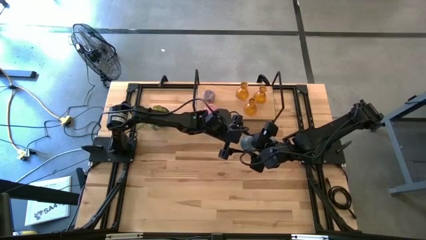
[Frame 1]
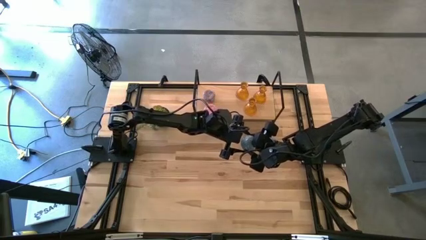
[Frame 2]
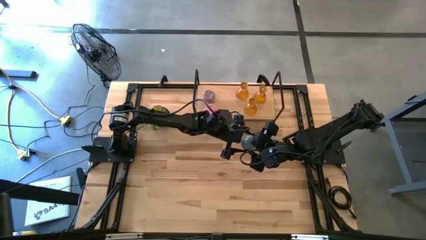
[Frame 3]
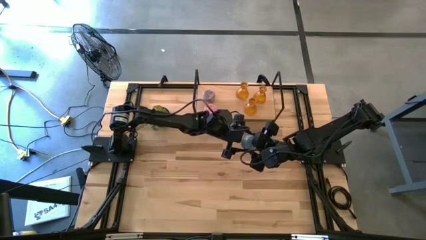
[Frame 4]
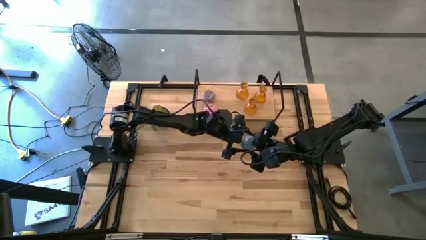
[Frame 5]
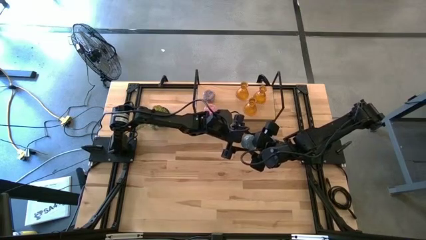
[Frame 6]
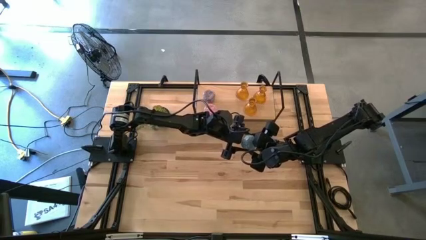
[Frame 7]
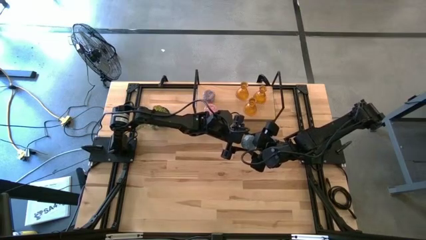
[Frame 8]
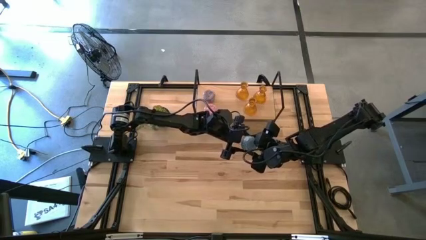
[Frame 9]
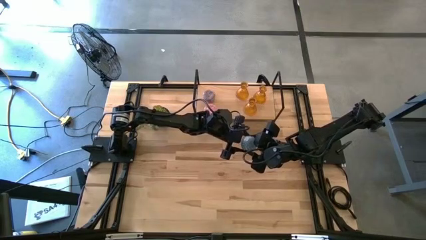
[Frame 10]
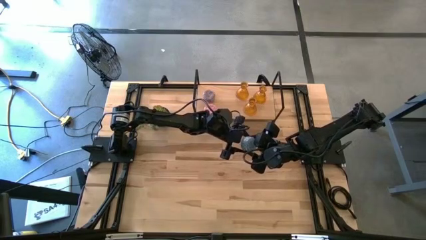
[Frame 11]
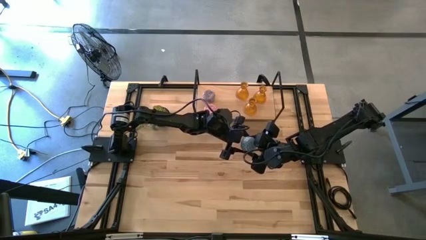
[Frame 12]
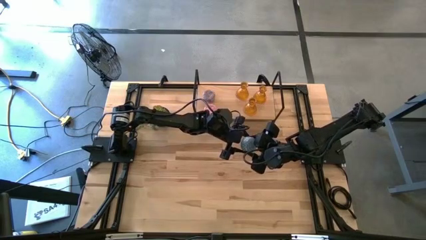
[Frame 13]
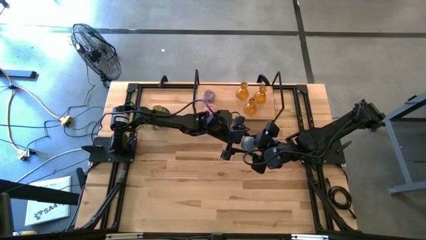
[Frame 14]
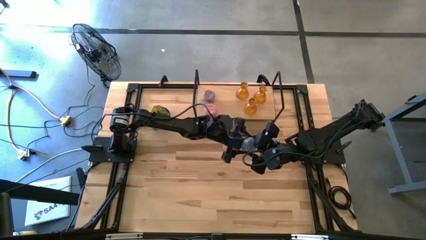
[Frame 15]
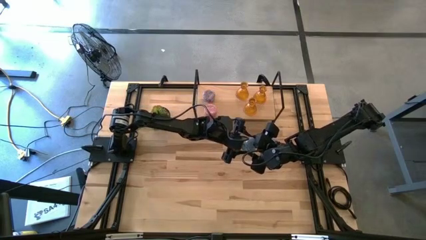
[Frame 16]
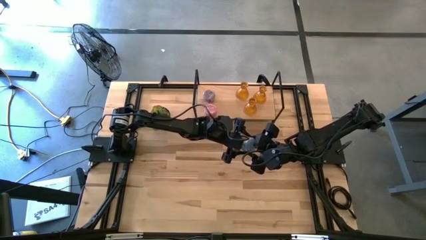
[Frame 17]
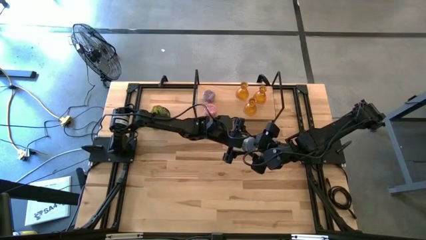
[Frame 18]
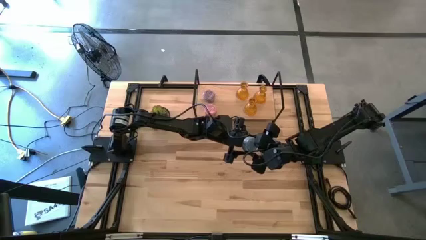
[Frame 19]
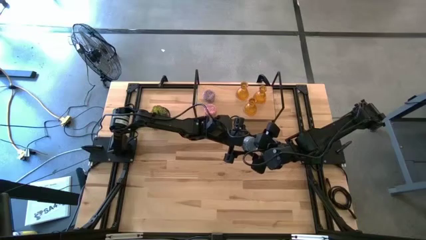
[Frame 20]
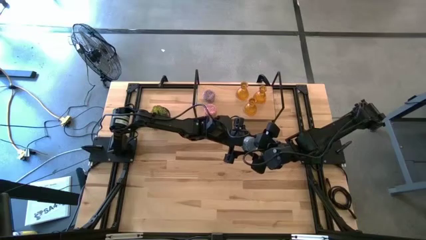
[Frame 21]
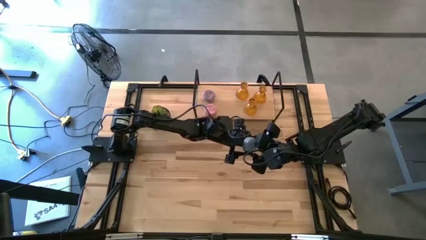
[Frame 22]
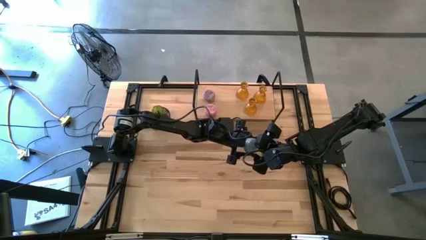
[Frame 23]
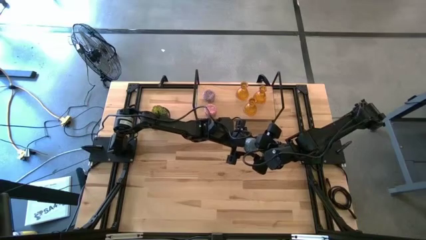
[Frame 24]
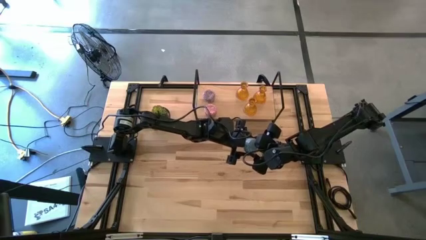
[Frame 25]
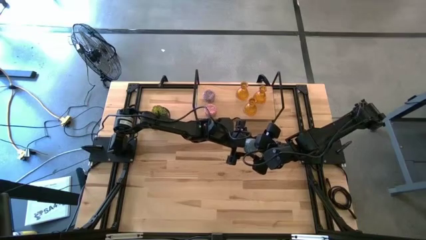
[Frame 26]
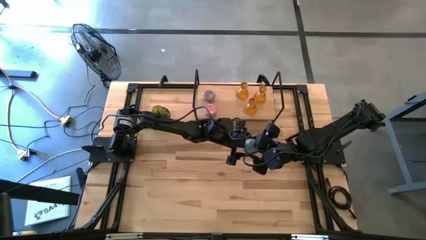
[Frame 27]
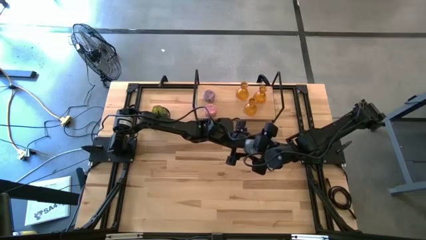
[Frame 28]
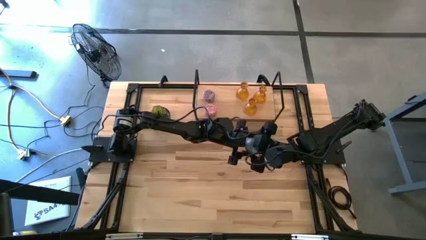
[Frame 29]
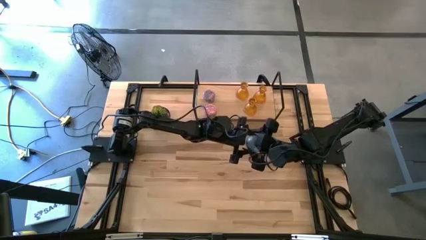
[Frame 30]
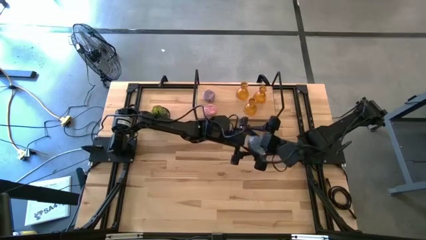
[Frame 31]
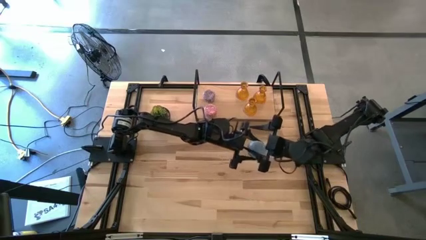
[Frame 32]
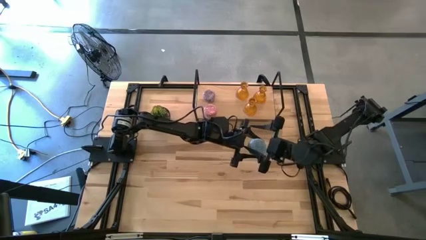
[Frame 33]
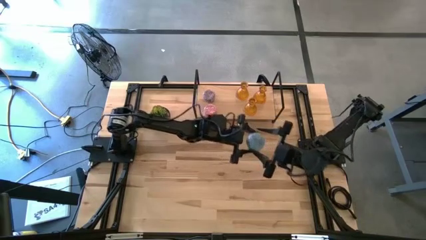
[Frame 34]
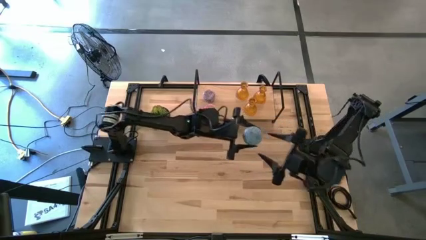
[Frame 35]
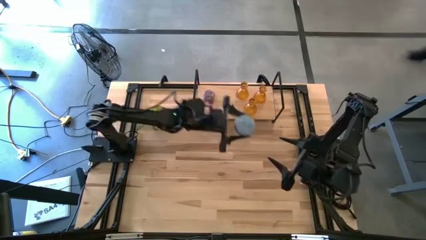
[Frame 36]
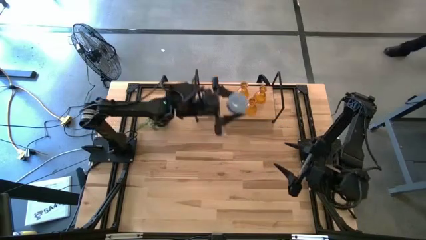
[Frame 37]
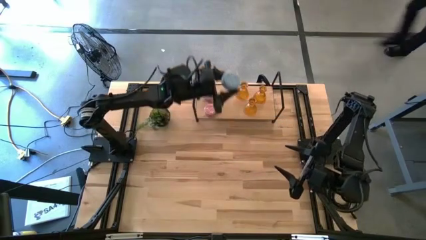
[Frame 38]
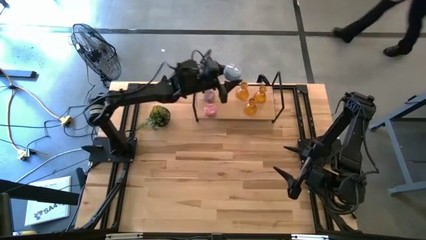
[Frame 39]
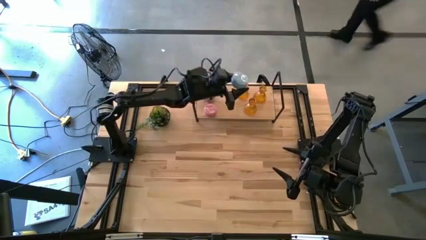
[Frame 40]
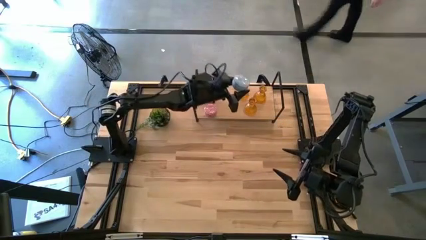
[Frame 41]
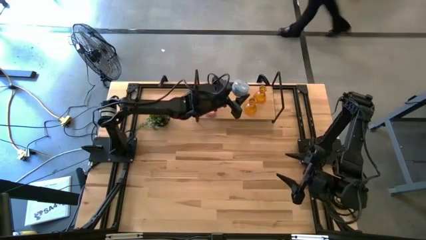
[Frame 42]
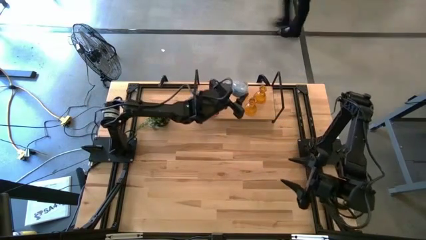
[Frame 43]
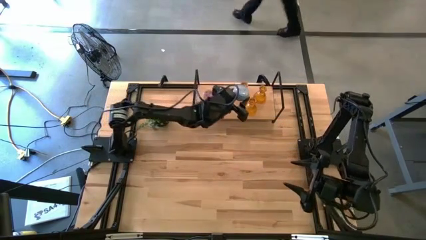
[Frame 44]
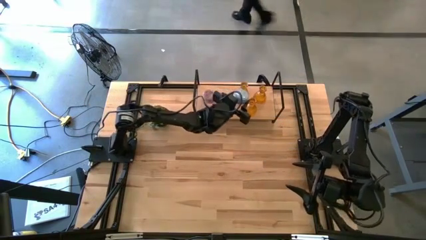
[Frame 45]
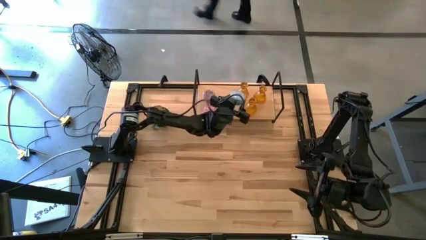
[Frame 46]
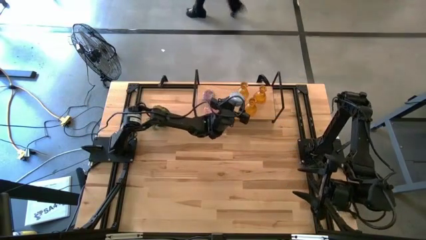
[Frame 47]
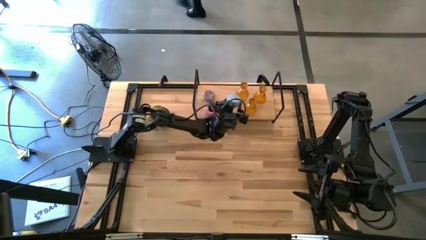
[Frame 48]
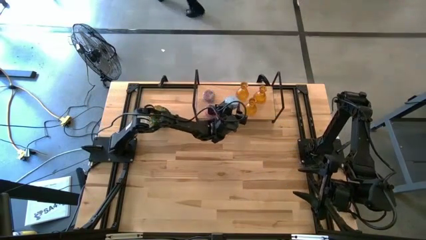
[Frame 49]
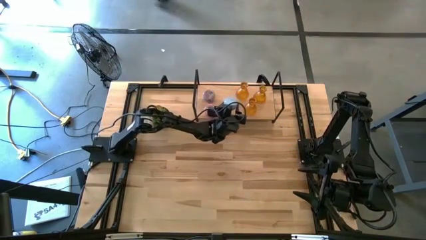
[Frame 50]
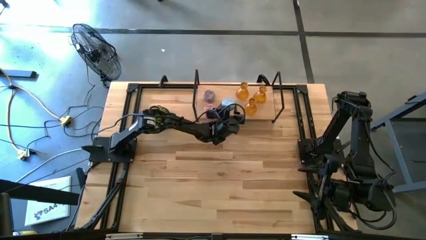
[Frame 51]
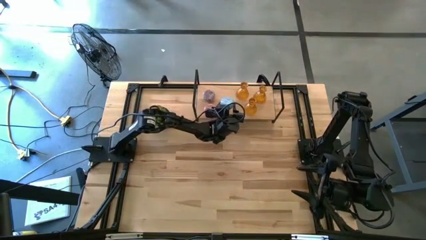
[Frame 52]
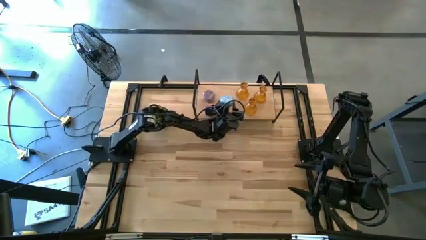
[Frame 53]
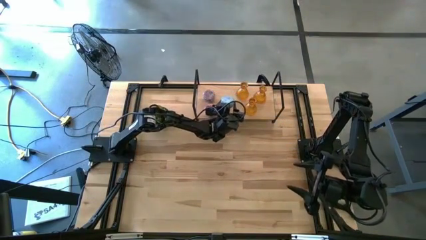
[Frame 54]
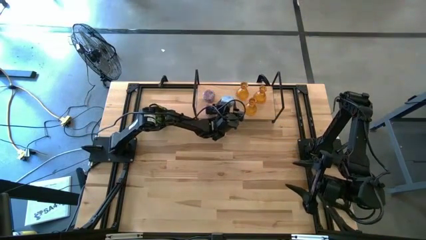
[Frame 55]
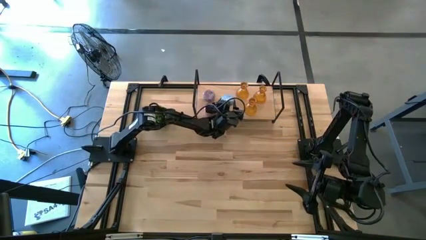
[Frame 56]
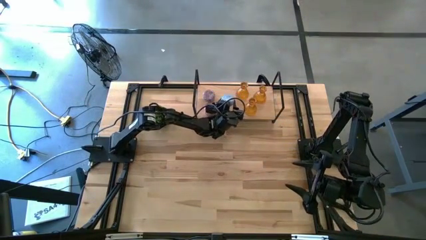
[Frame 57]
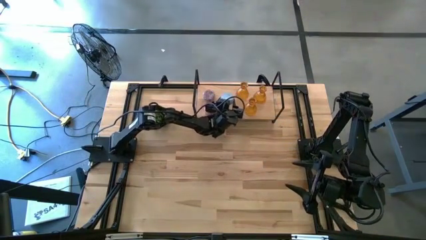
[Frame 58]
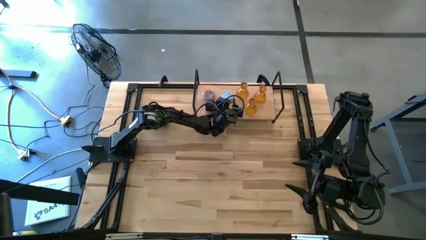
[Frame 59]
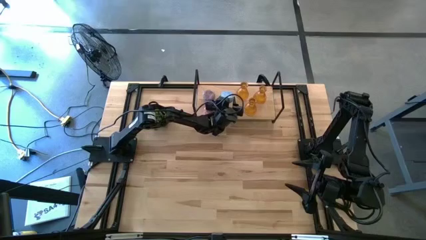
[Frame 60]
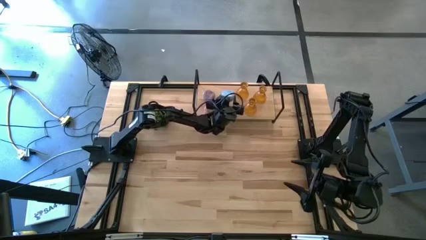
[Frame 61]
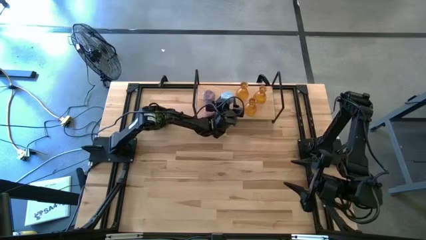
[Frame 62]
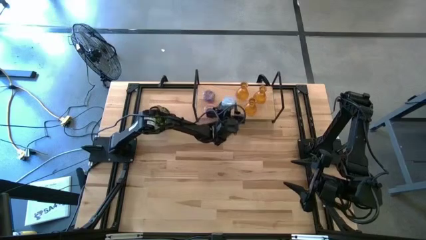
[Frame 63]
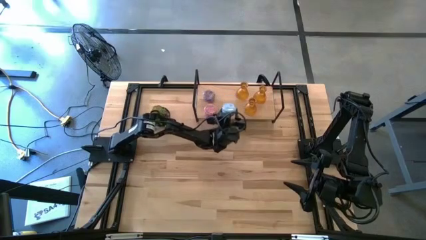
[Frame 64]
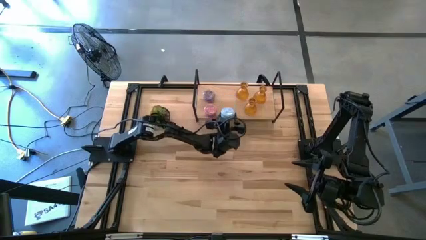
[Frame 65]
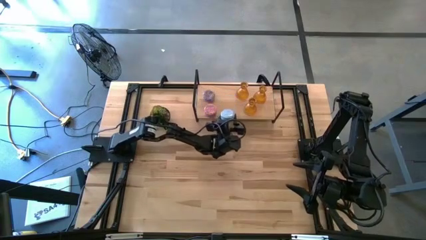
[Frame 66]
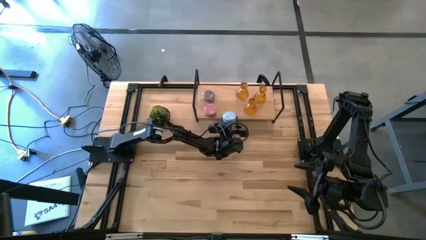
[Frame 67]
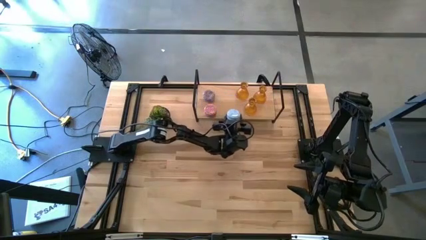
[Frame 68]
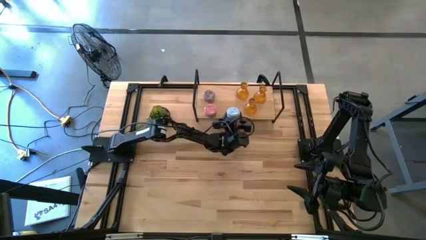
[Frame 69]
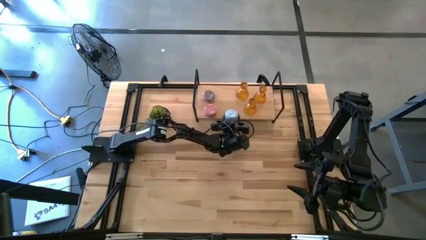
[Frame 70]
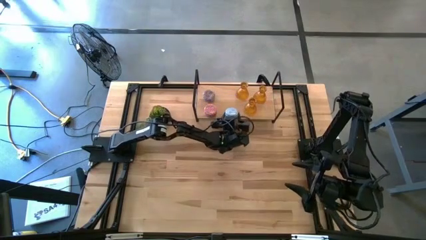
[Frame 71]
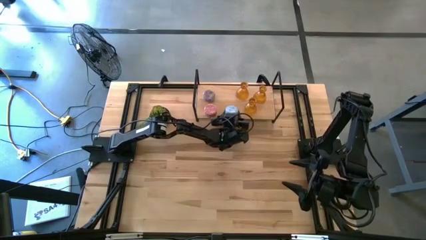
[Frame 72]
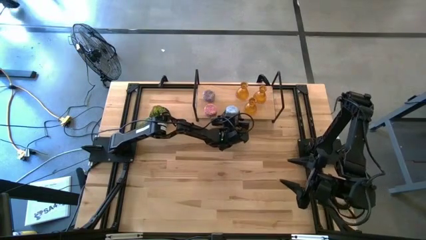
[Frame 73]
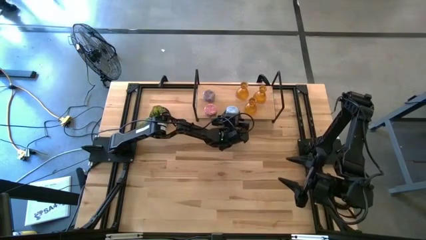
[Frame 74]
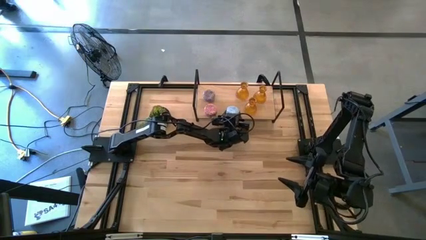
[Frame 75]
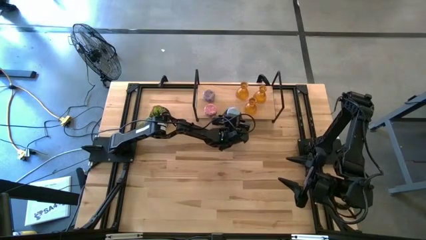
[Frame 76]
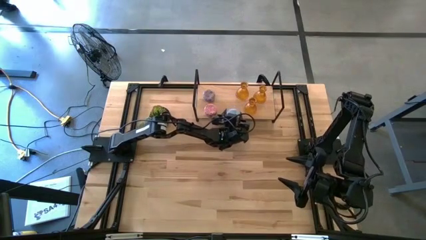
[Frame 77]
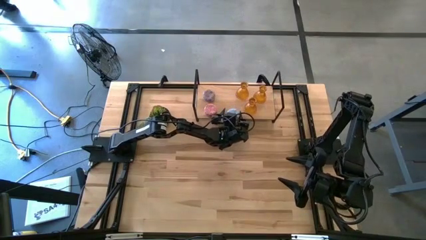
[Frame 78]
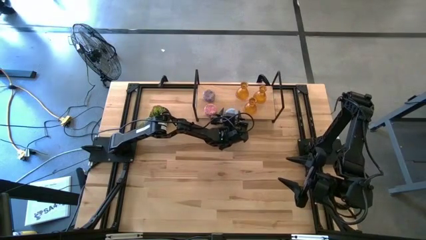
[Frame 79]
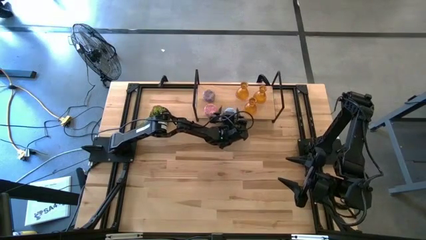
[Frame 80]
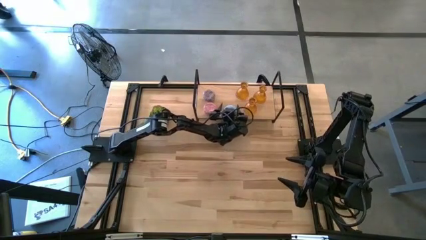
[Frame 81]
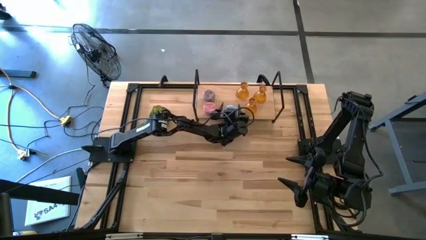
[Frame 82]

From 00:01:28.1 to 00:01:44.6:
Task: Pick & Place candle stick holders
Put the blue patterned scented candle on the shelf
